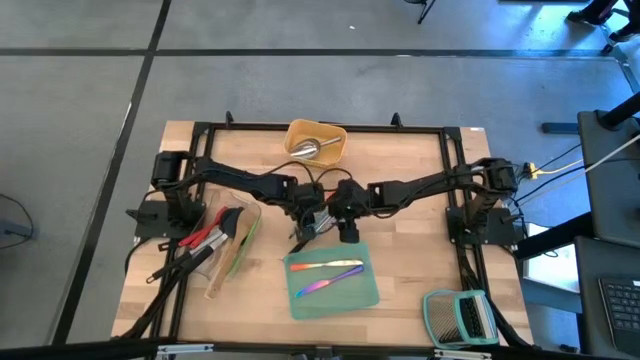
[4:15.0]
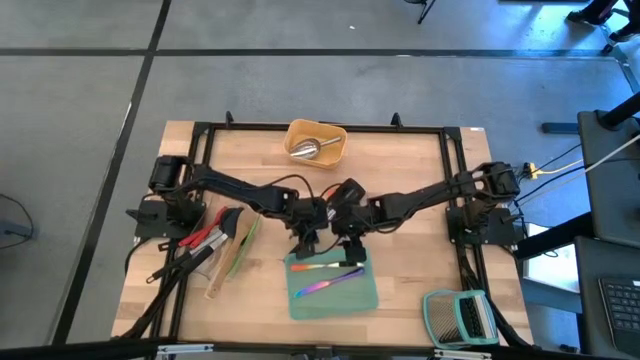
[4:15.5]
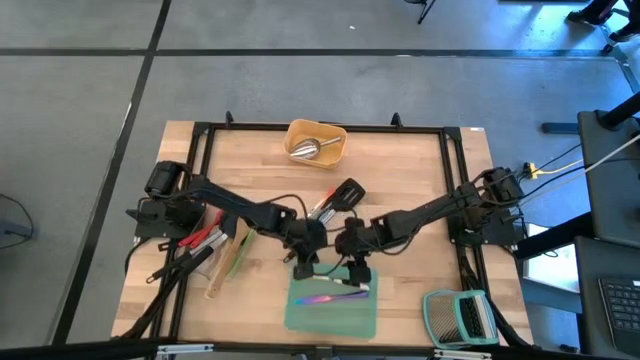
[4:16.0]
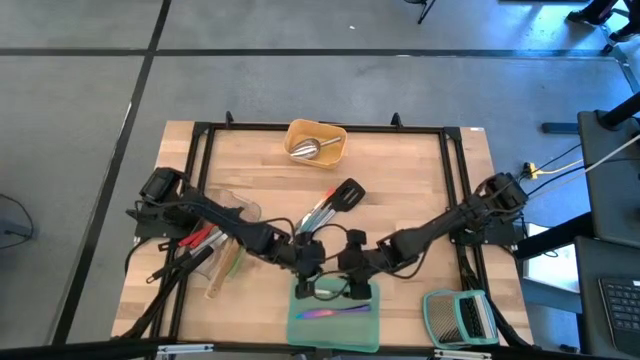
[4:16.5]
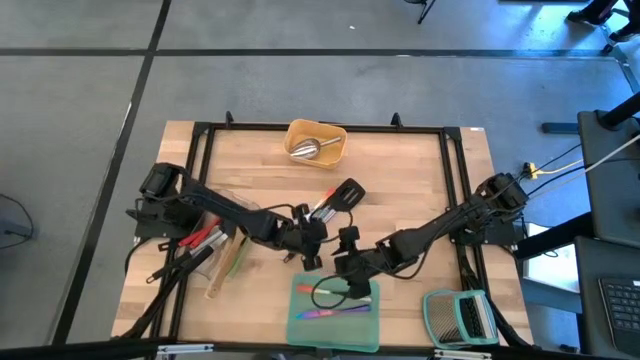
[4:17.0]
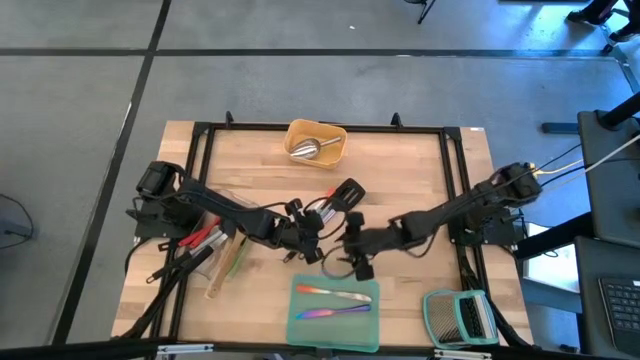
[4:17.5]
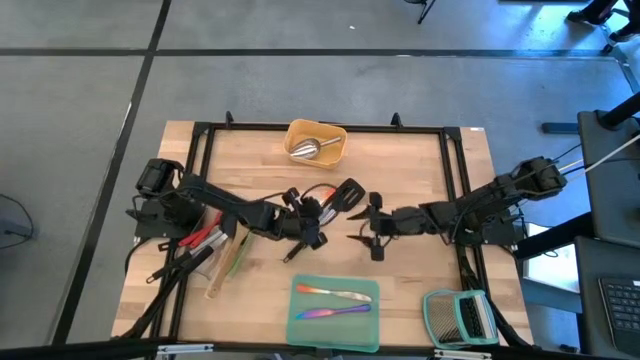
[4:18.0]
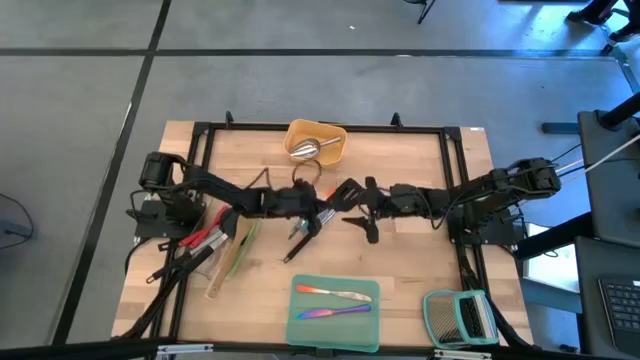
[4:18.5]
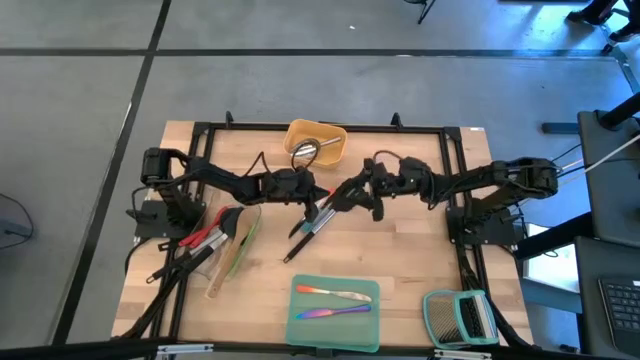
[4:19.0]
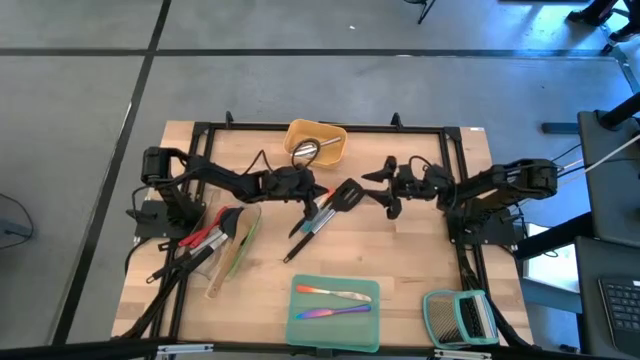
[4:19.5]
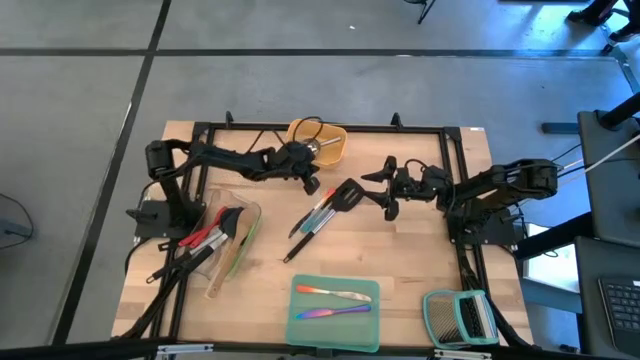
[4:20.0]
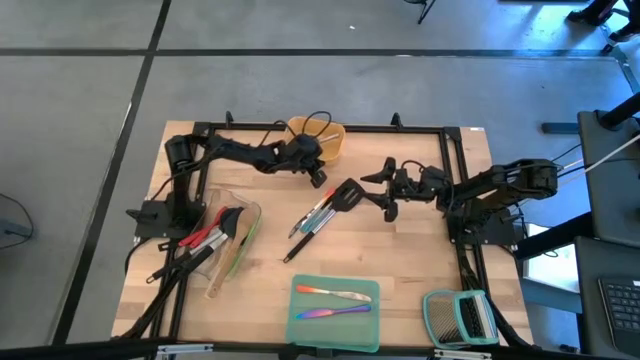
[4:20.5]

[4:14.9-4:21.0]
Task: Pick & Place Kitchen Items
Adjust the bins on the table

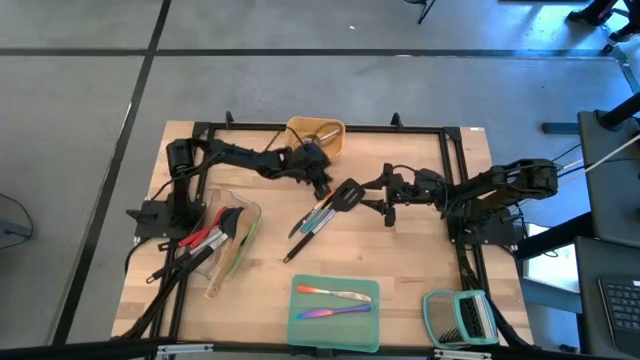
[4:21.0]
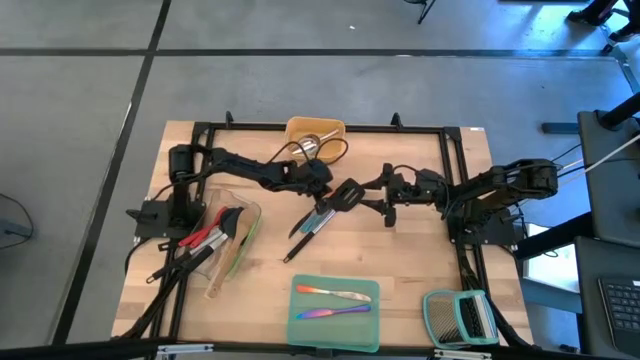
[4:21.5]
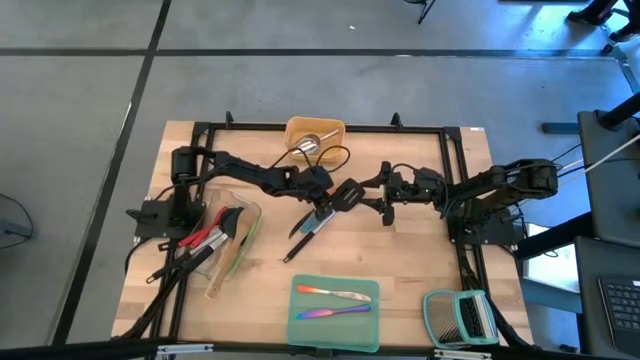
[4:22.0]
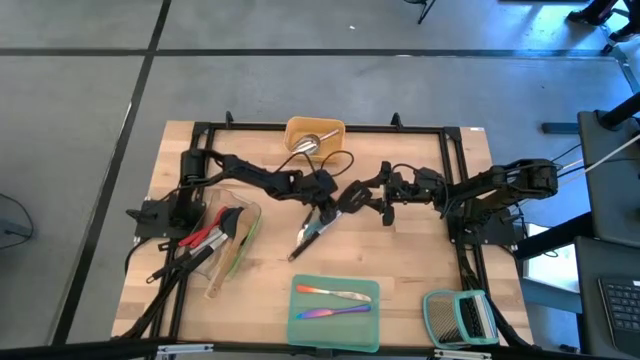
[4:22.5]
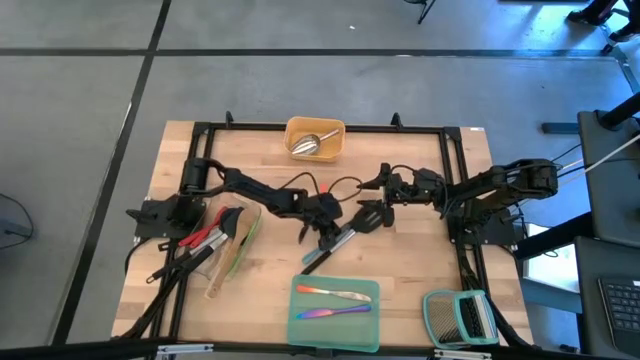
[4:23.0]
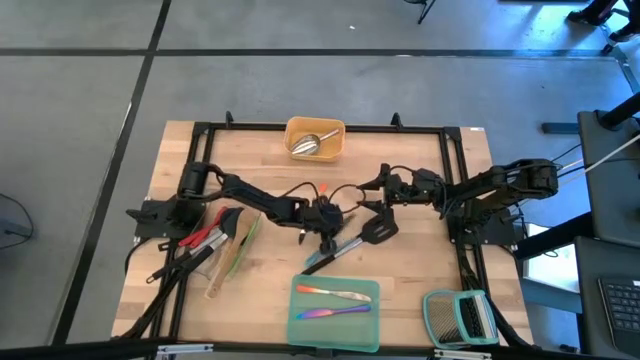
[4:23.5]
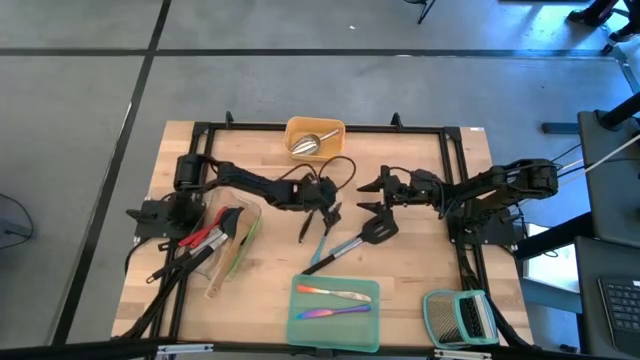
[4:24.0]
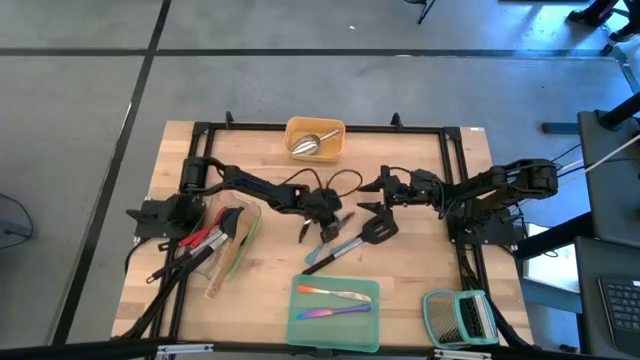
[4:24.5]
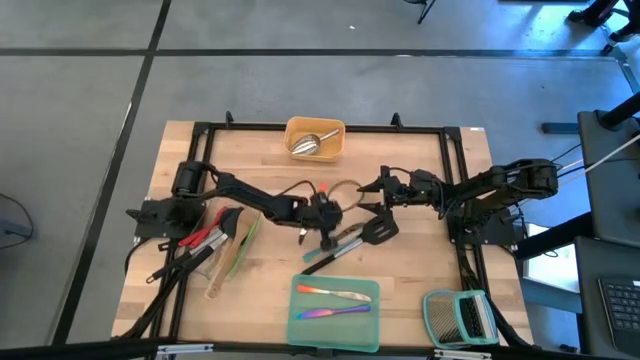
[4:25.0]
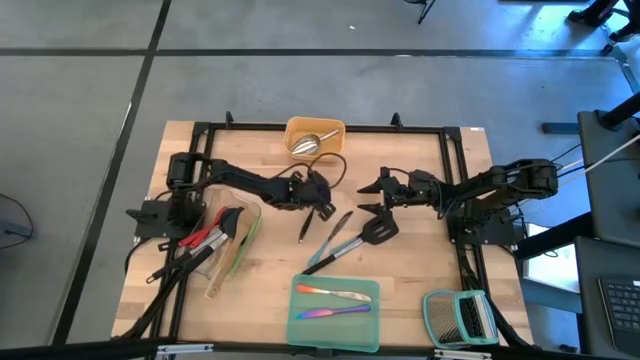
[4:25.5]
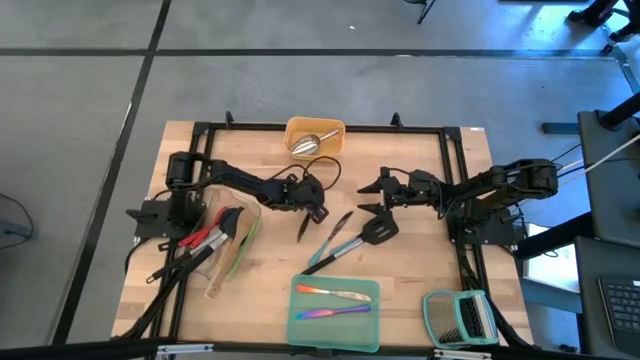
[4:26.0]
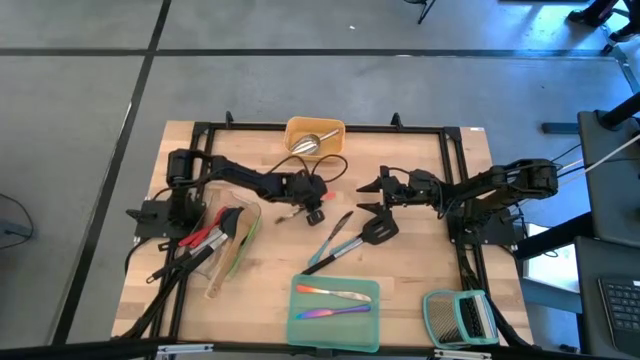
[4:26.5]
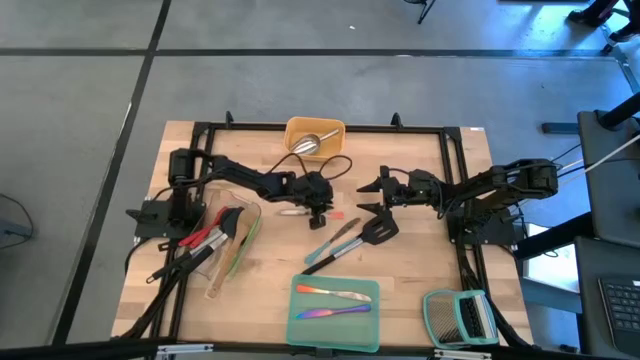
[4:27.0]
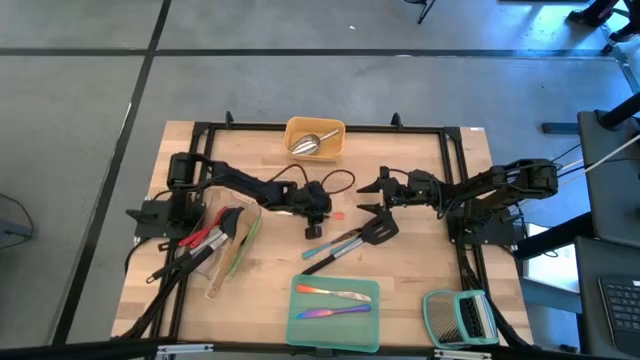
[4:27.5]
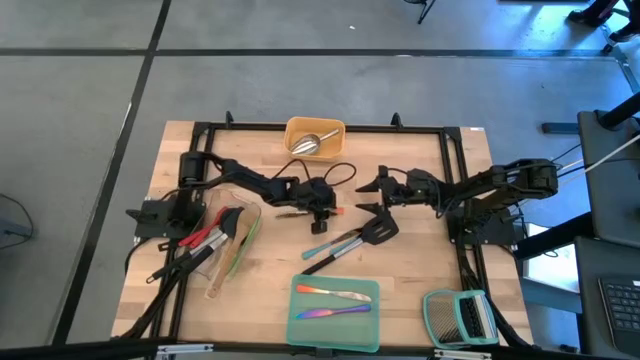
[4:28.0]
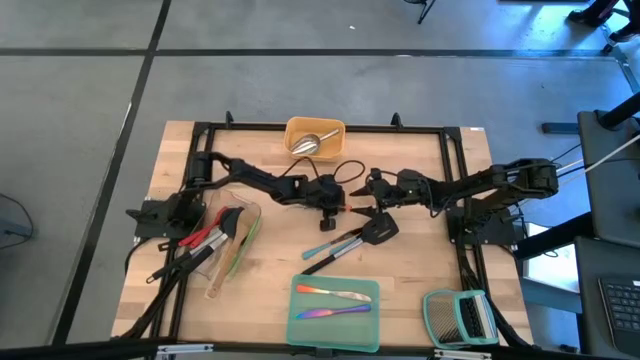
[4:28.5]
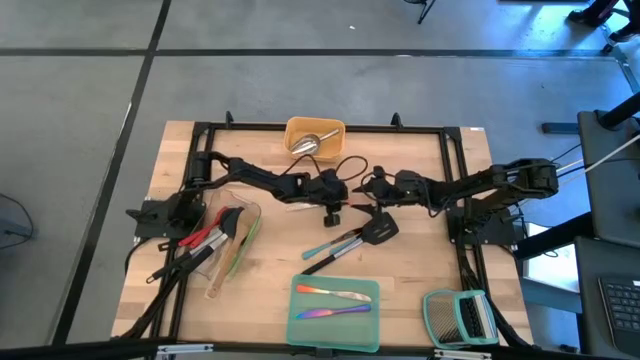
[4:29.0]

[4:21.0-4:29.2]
Put the orange table knife into the green bin

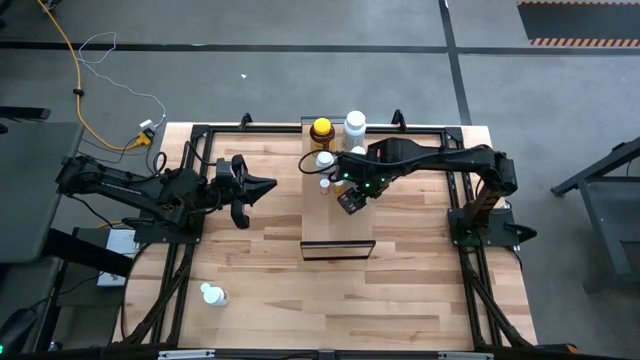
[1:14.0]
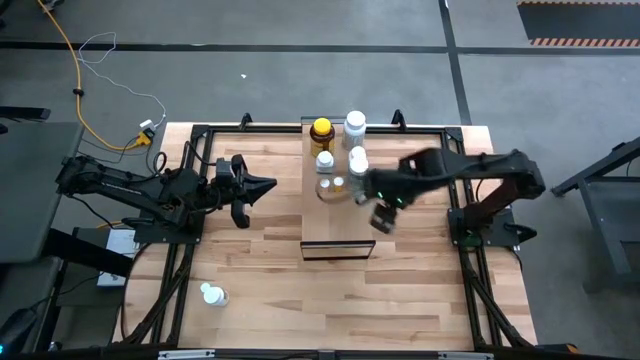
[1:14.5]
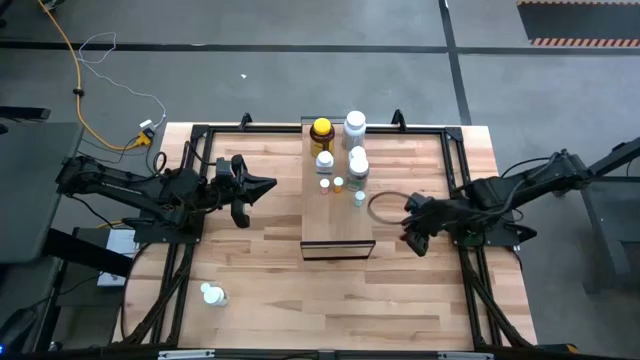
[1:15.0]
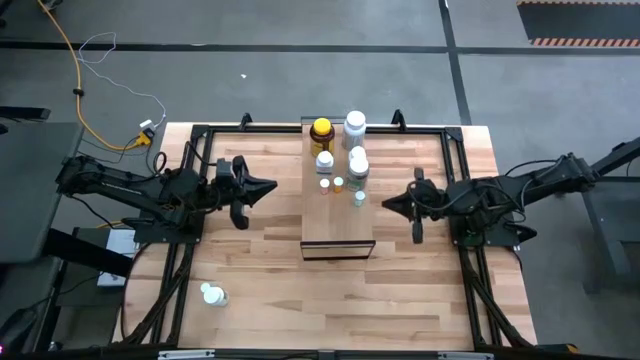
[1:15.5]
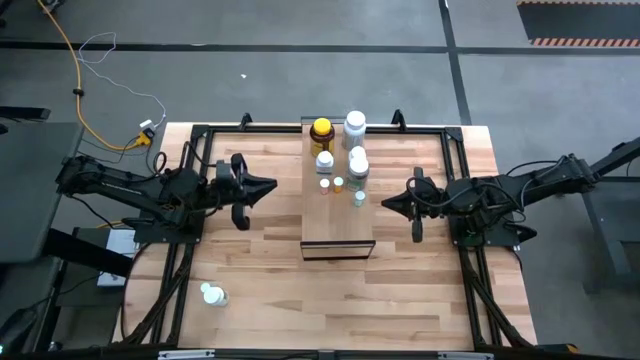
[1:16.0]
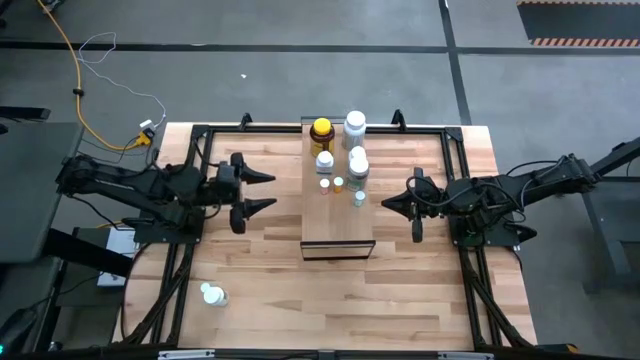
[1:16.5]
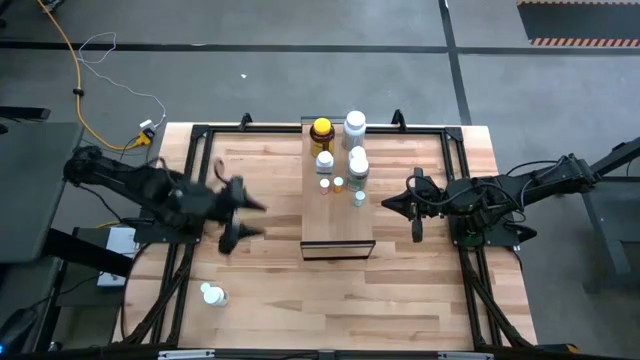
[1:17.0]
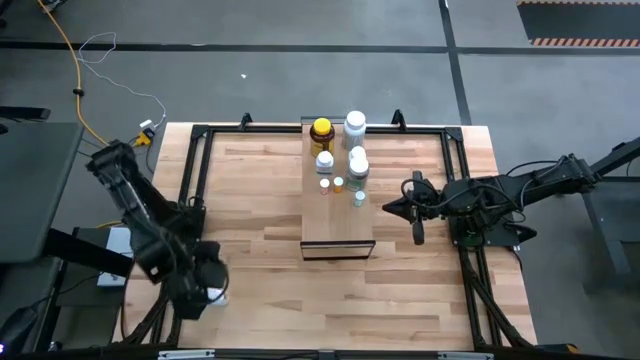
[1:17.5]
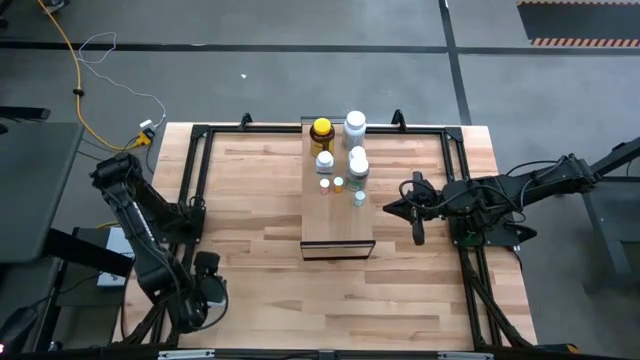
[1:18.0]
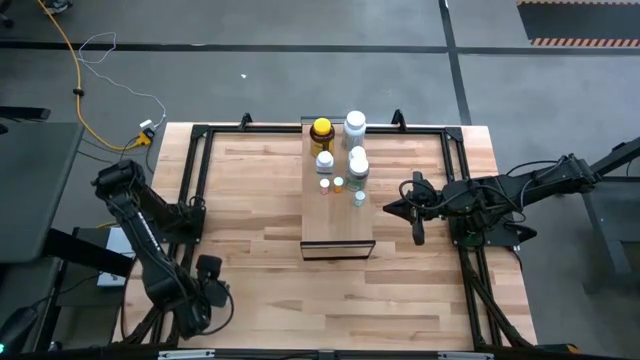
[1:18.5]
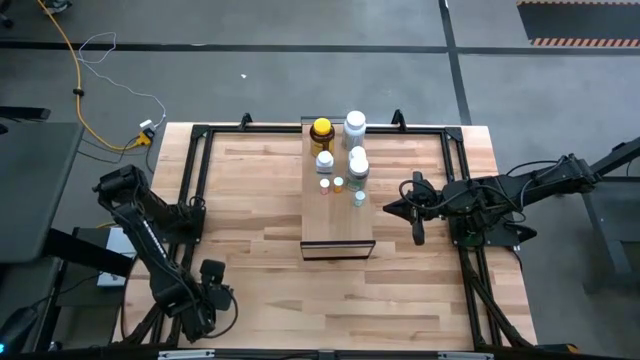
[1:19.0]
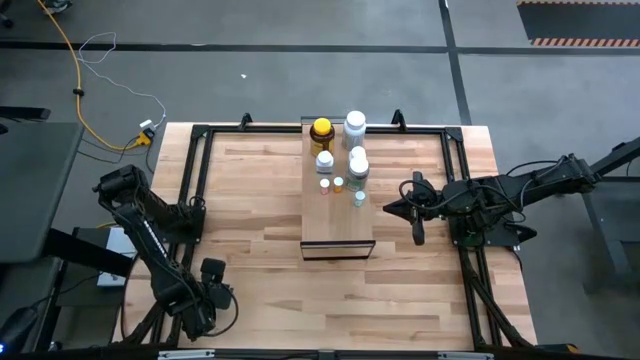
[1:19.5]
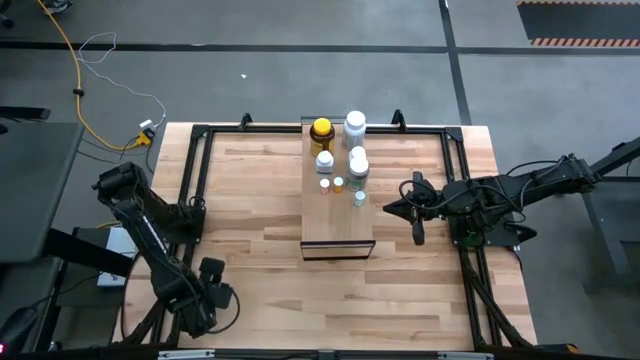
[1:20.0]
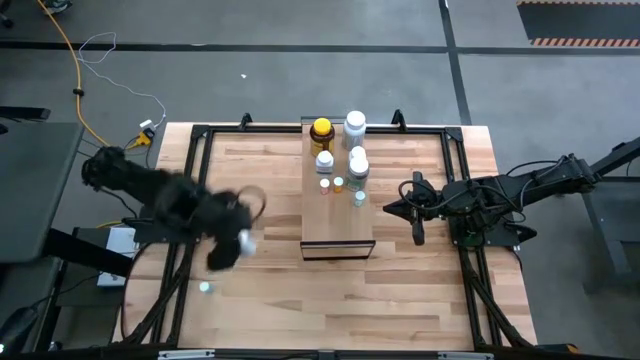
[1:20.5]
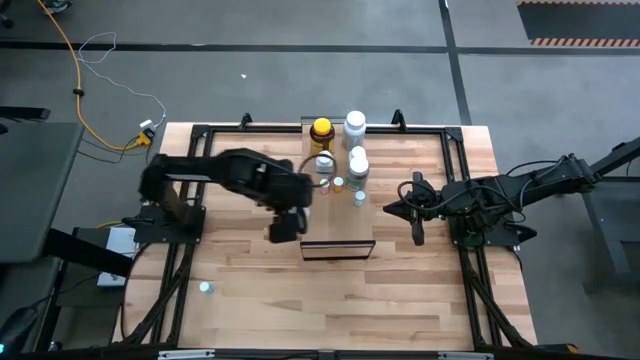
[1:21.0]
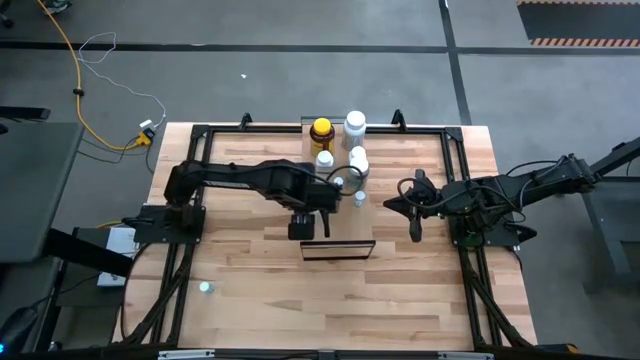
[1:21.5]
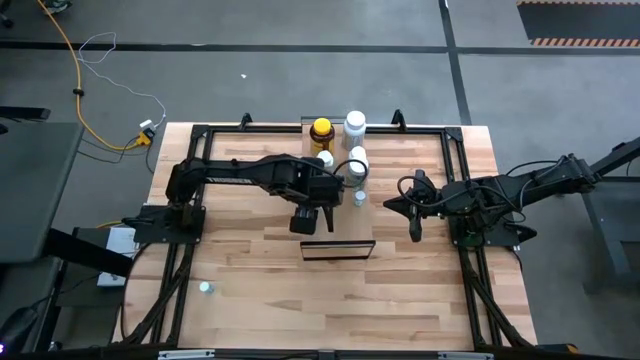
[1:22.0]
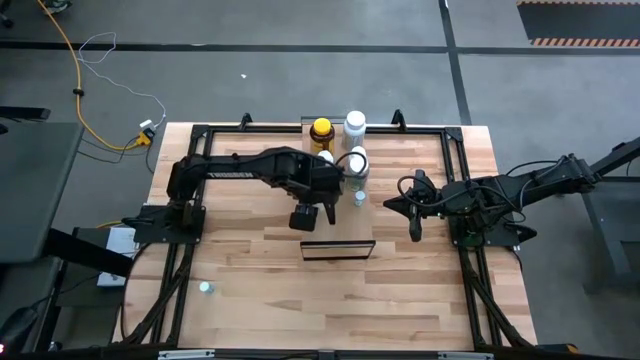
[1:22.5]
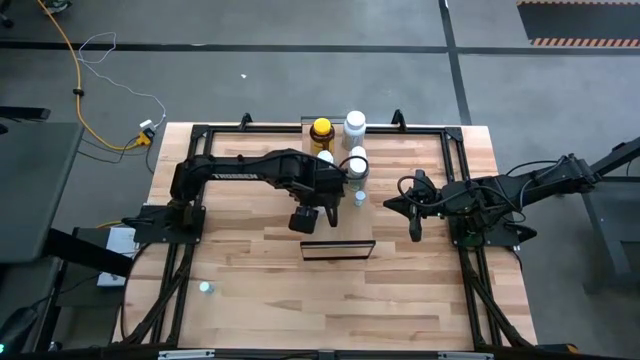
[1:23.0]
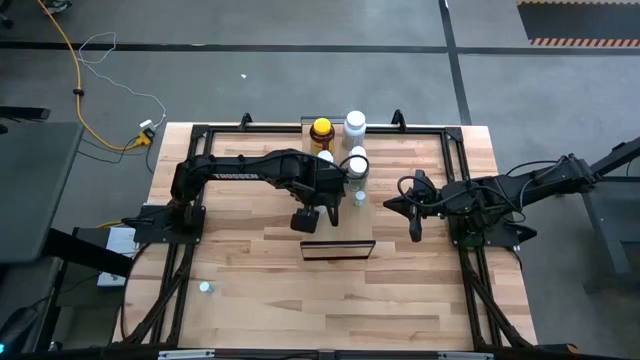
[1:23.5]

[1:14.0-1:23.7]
Task: Pick and place medicine bottles onto shelf by color
Put the white green pill bottle on the shelf
